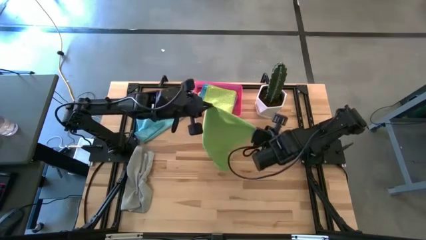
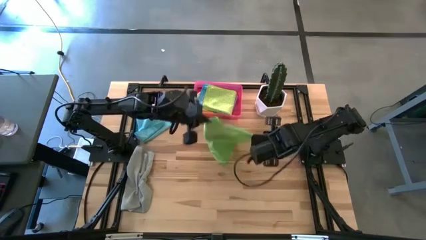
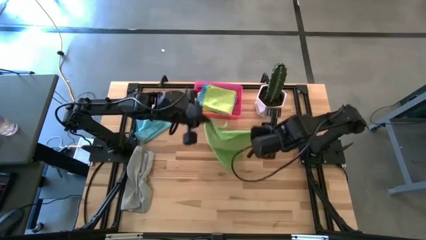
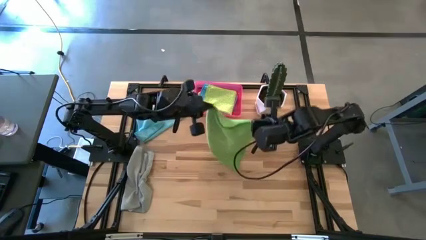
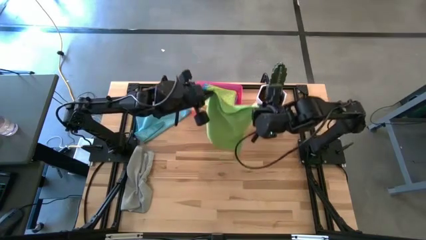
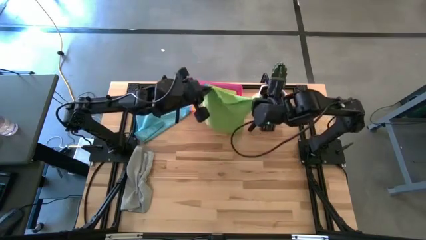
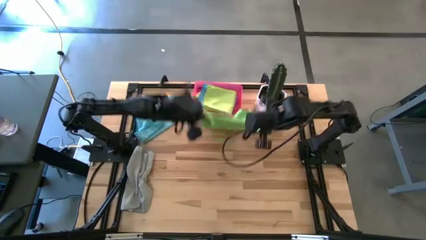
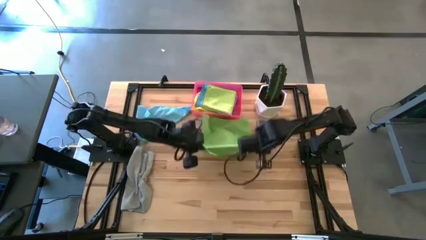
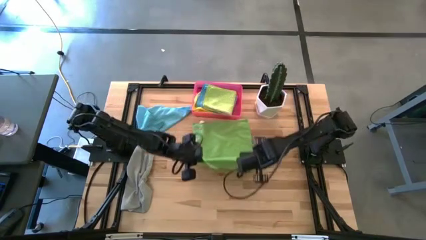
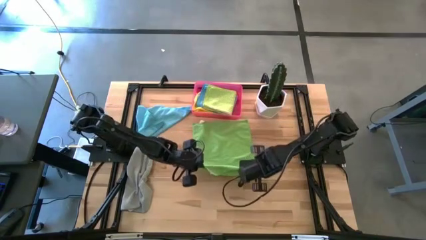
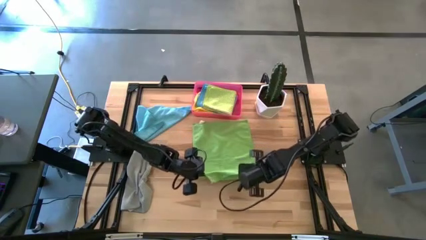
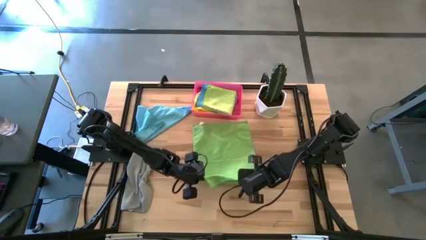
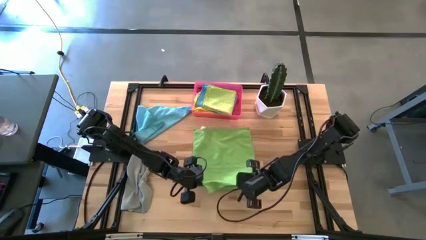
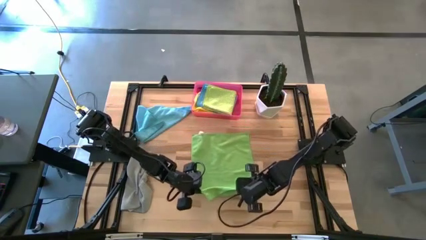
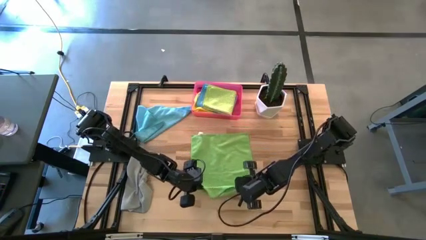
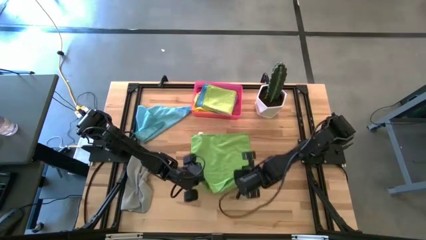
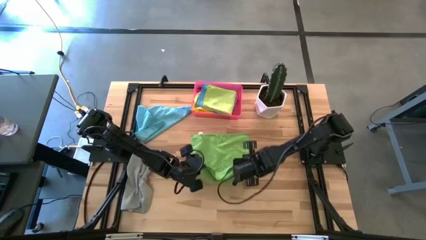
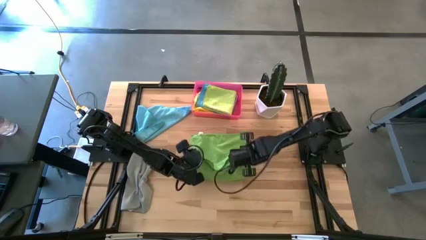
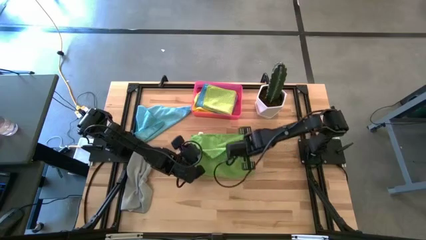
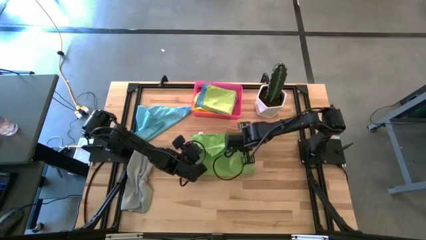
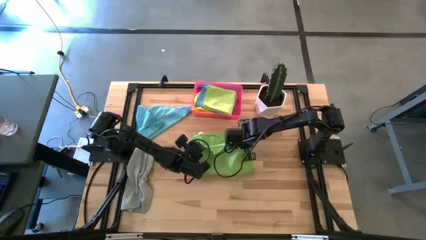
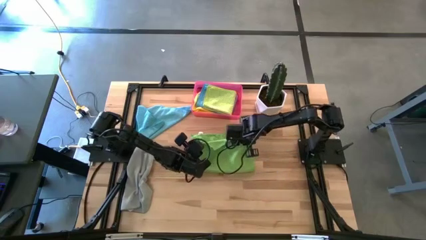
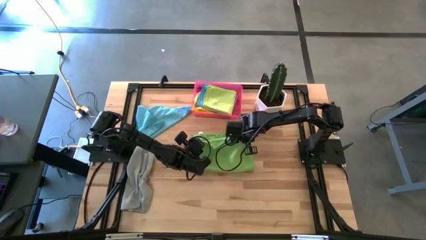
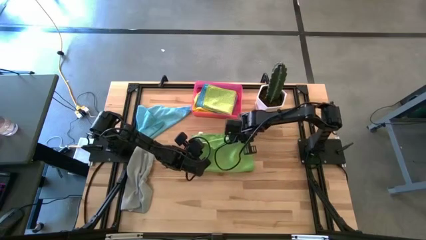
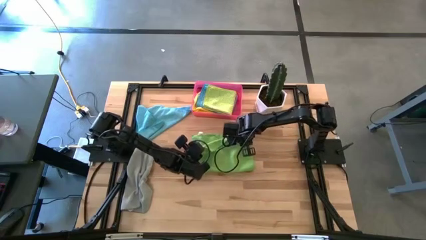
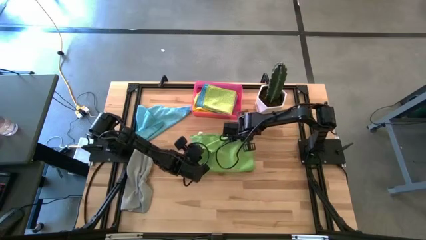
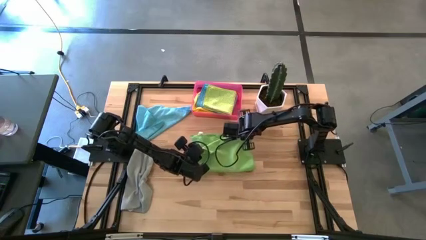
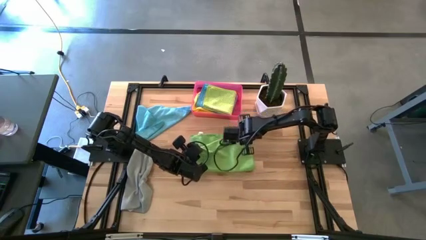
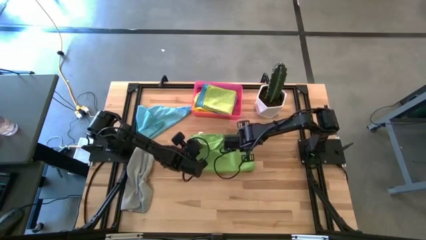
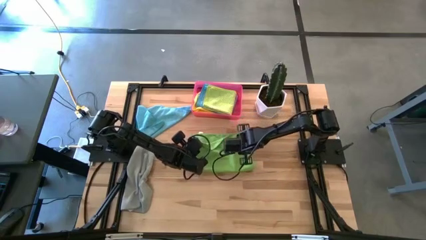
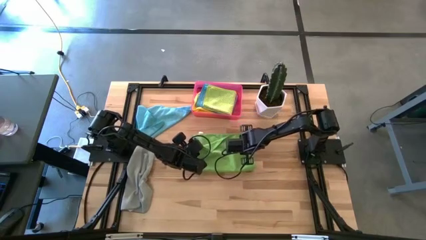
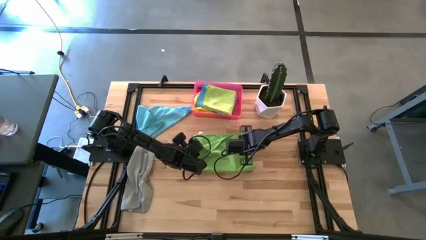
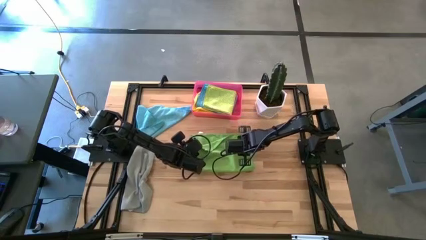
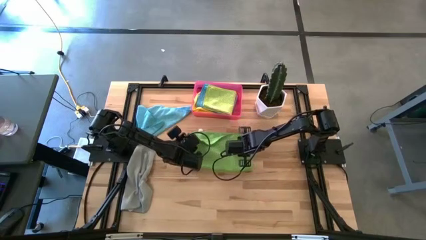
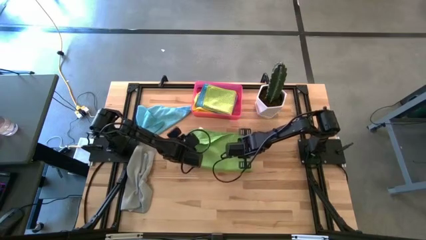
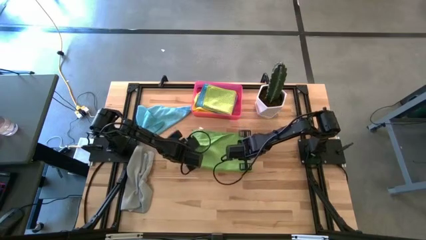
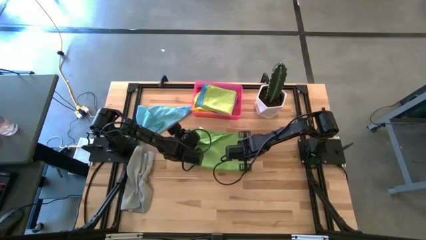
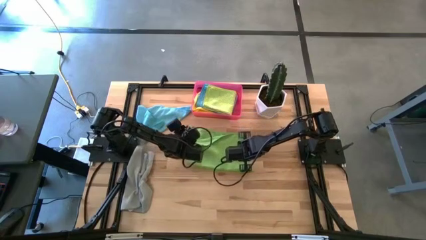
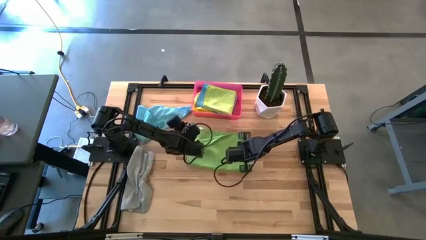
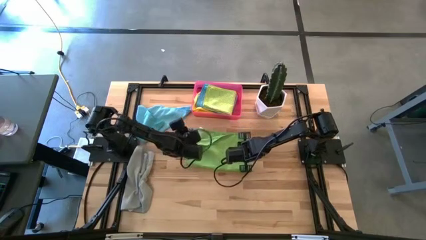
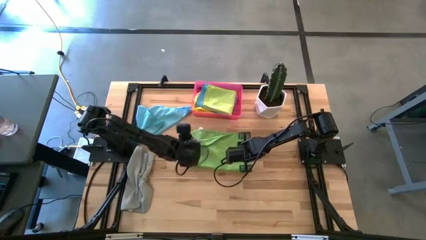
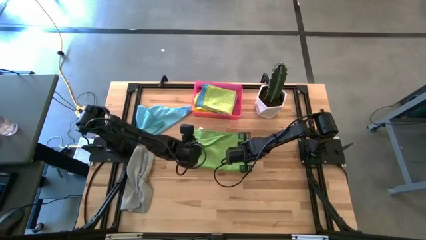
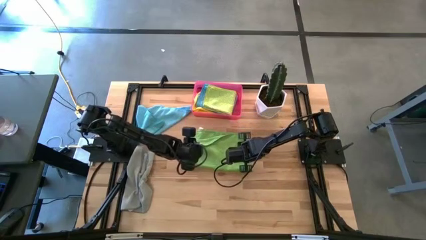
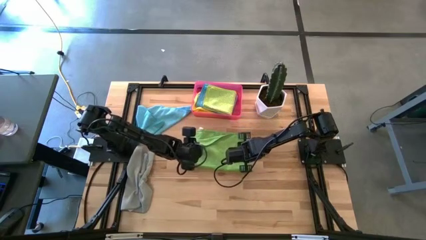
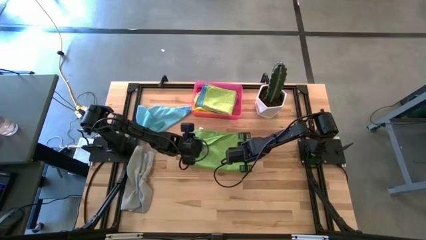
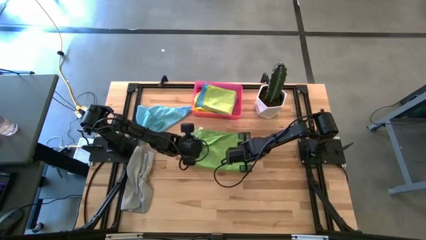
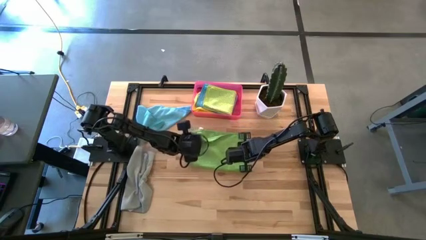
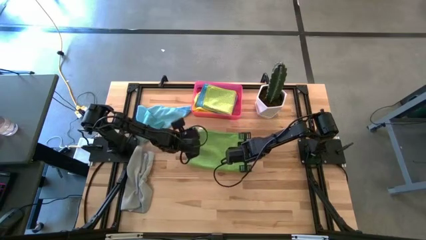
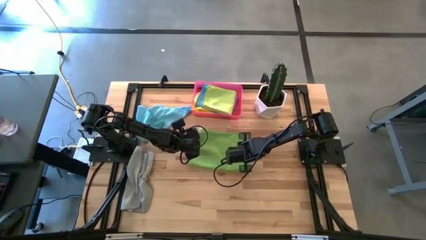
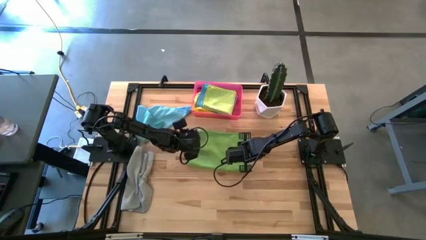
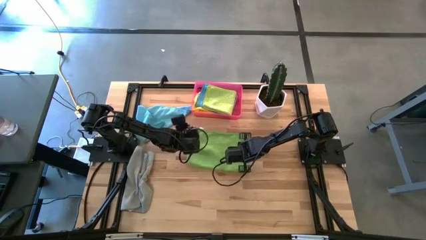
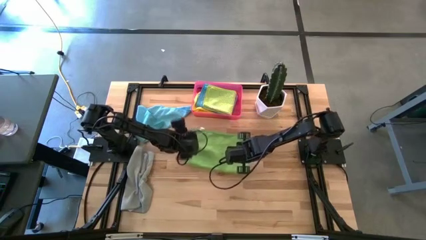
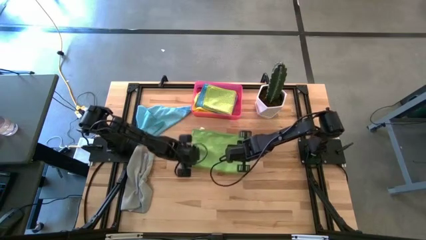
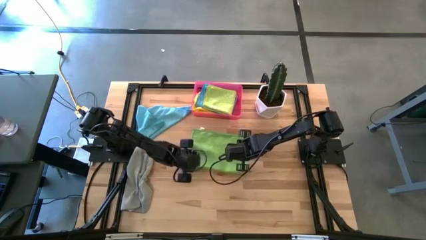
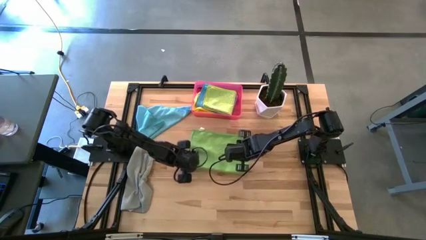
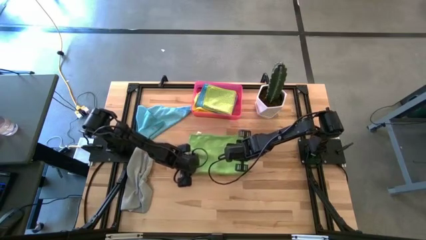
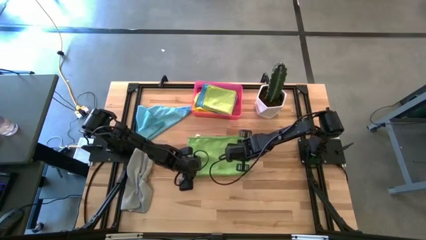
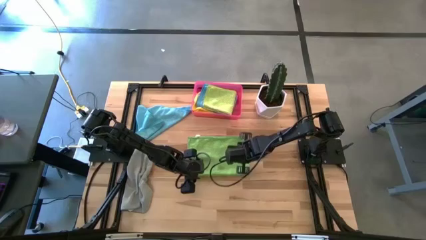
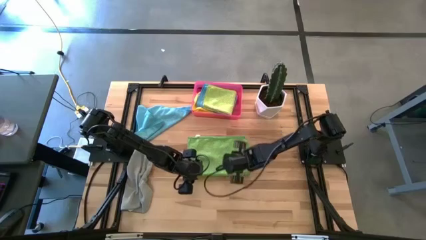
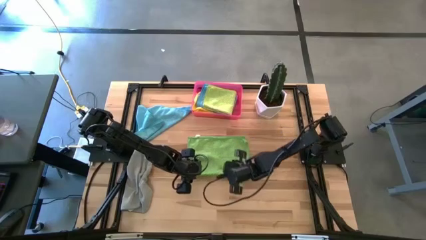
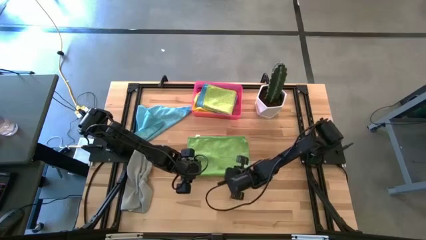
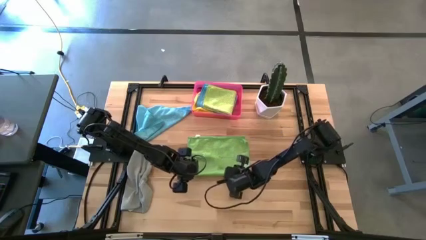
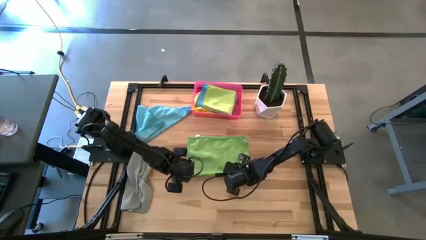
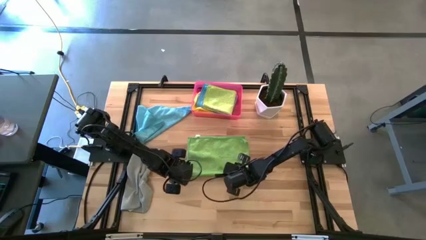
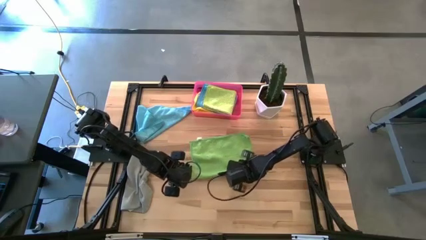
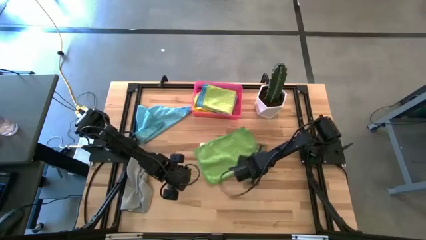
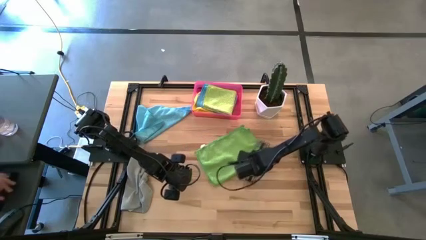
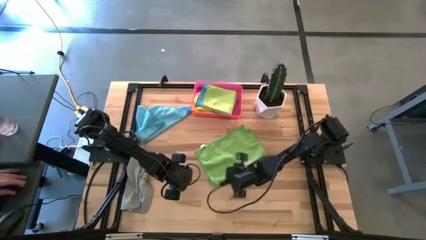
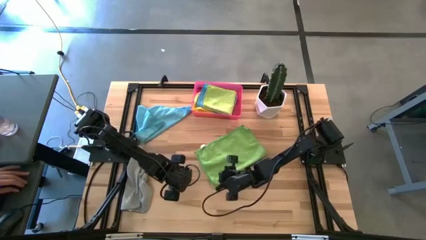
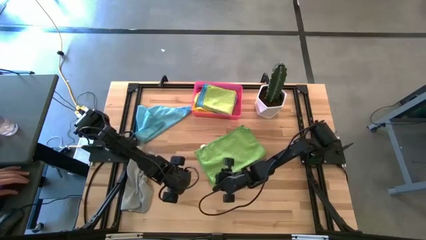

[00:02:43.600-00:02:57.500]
Task: Fold microfiber towels
Fold the green microfiber cloth on the table

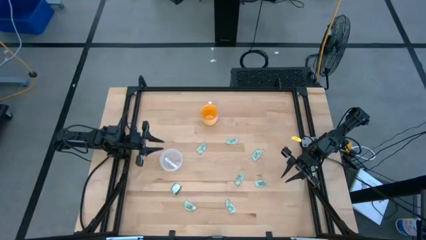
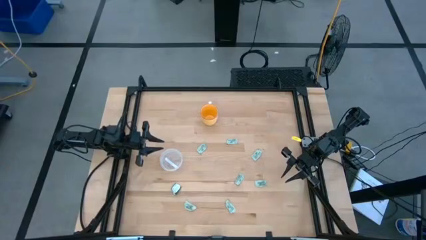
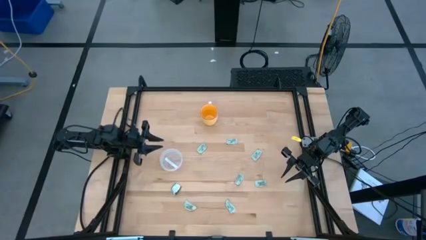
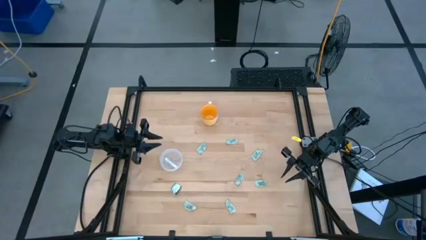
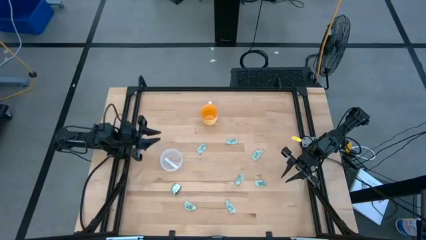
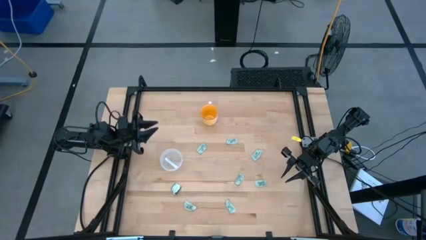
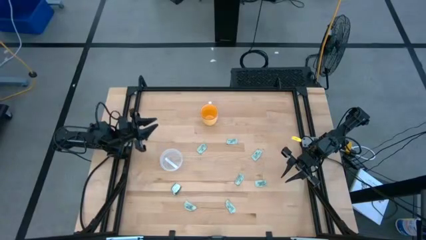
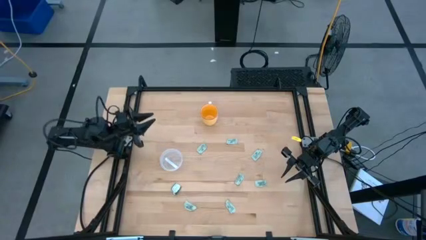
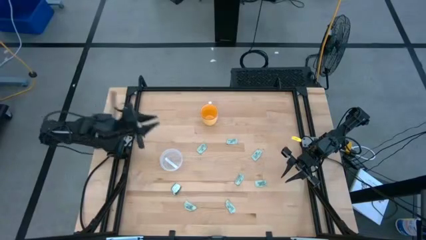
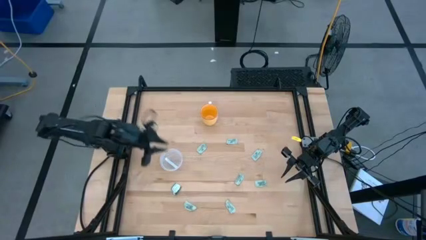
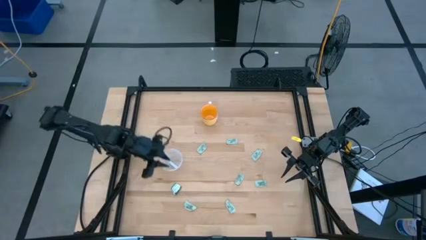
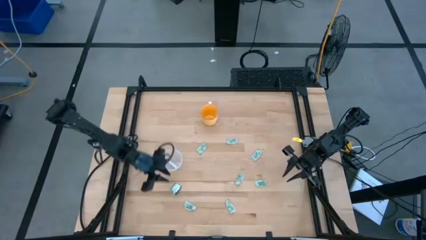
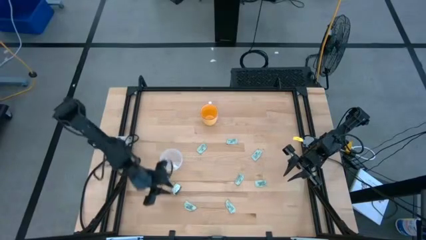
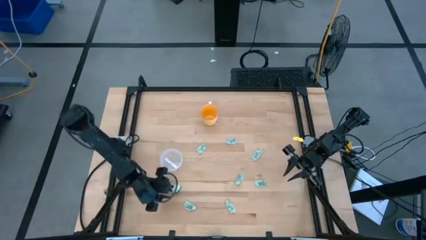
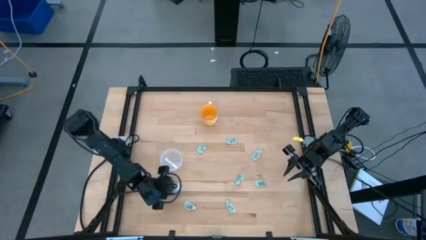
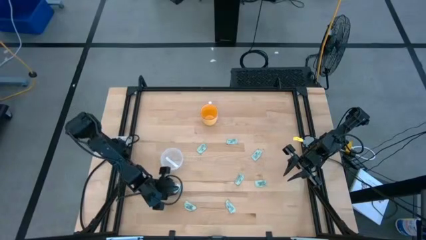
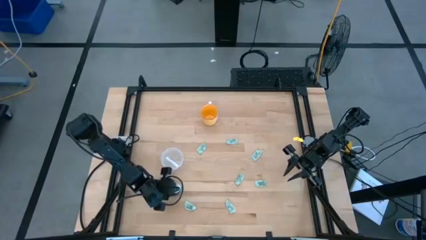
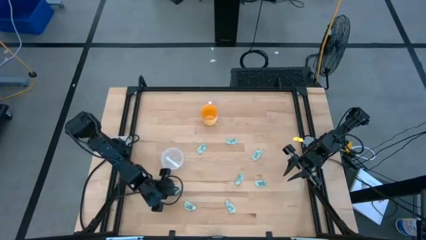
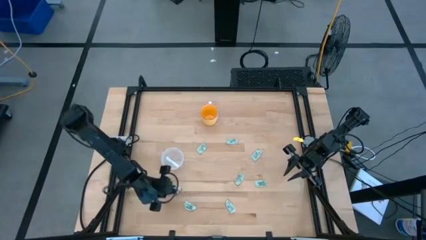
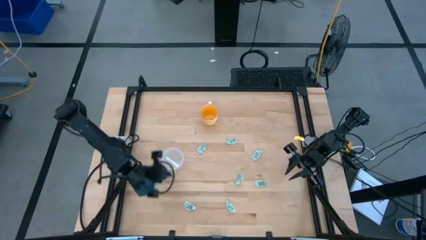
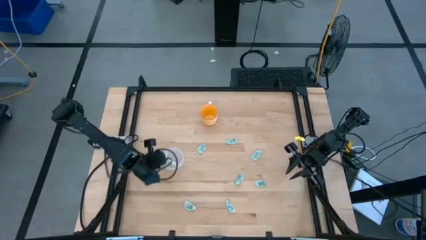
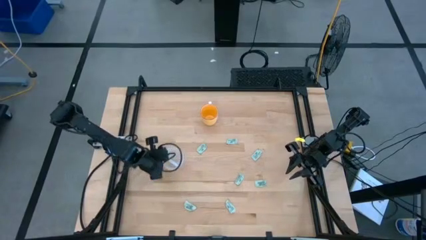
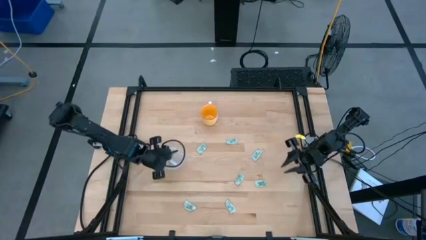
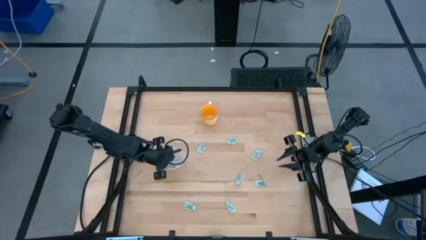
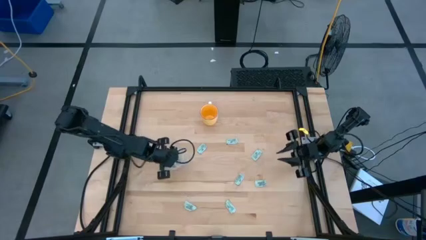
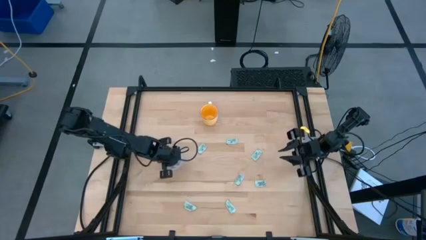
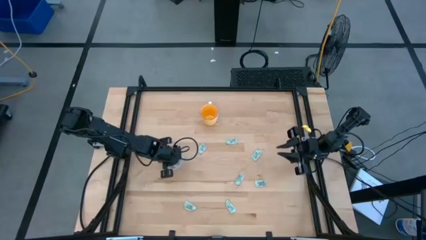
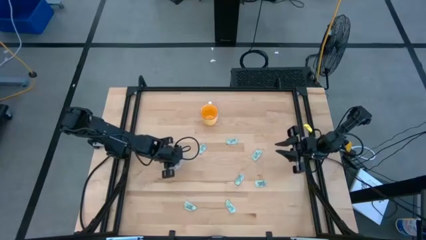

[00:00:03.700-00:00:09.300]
Task: Pick and place Stevia / Truvia into bins
Put the dark green stevia packet into the container
